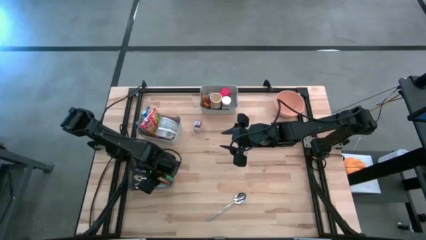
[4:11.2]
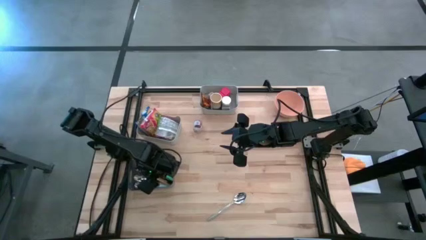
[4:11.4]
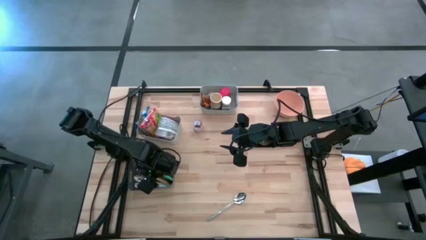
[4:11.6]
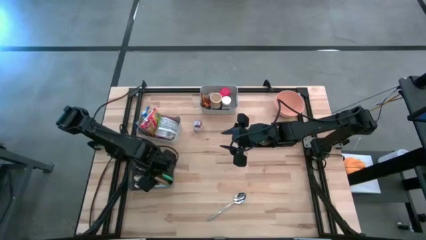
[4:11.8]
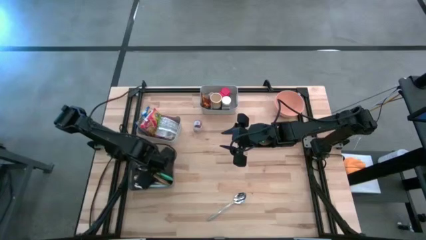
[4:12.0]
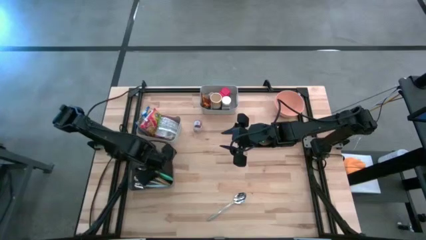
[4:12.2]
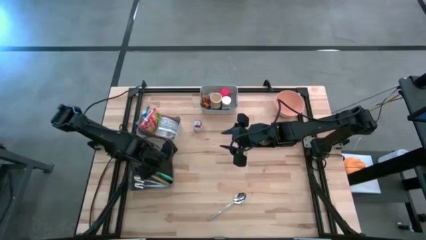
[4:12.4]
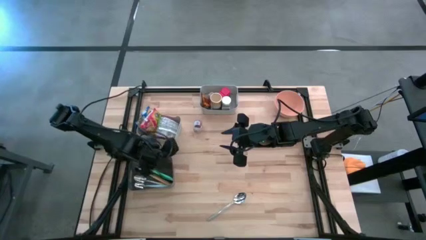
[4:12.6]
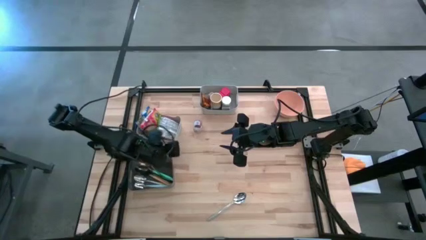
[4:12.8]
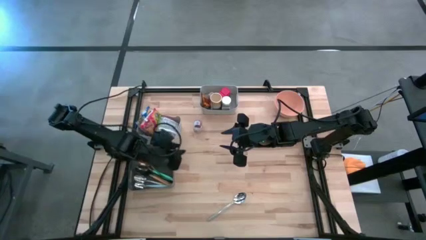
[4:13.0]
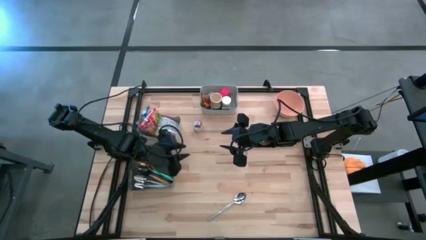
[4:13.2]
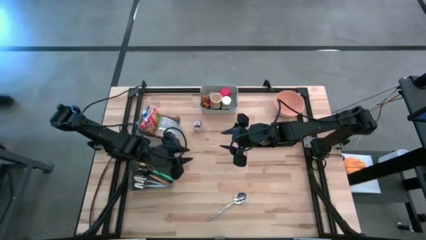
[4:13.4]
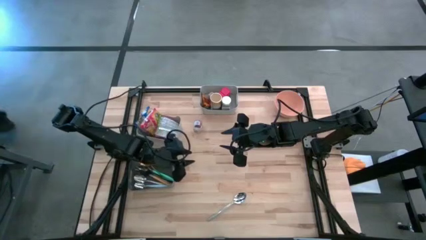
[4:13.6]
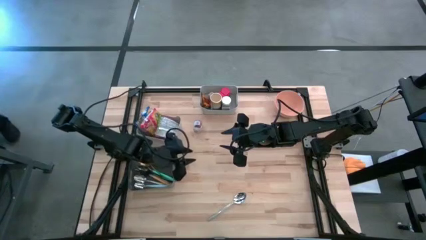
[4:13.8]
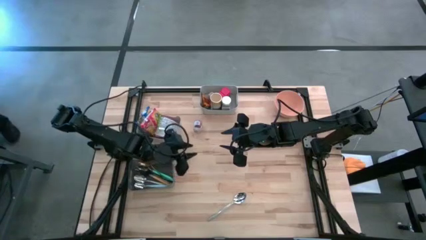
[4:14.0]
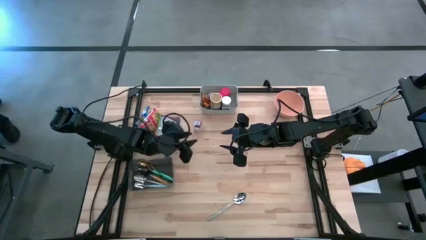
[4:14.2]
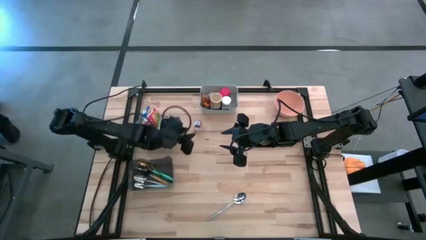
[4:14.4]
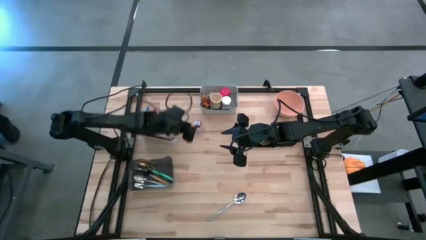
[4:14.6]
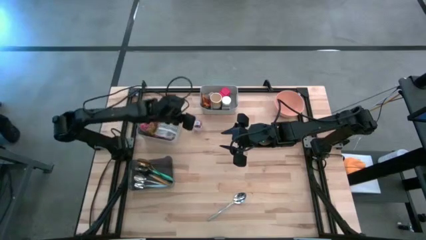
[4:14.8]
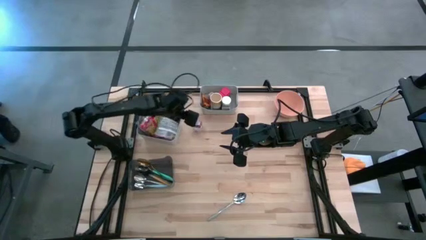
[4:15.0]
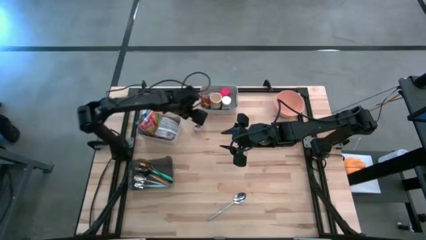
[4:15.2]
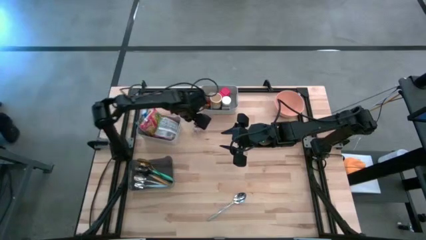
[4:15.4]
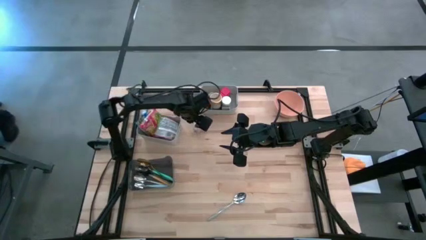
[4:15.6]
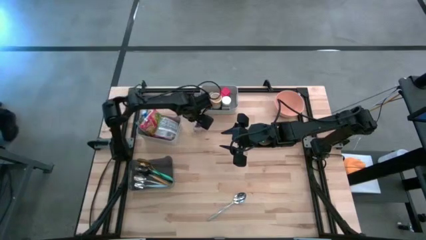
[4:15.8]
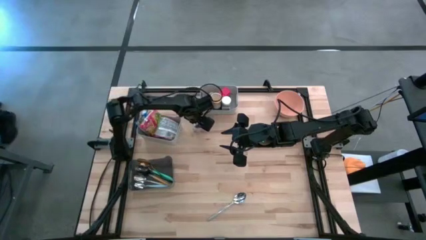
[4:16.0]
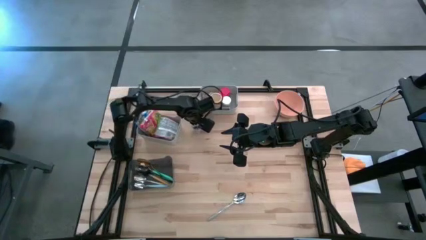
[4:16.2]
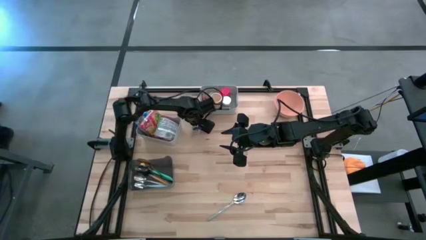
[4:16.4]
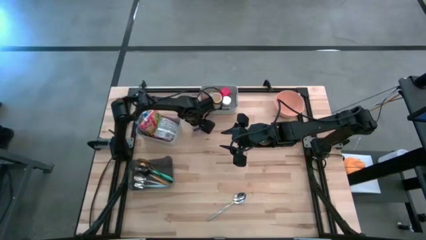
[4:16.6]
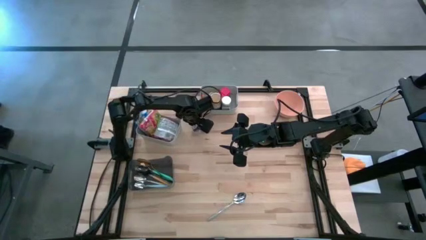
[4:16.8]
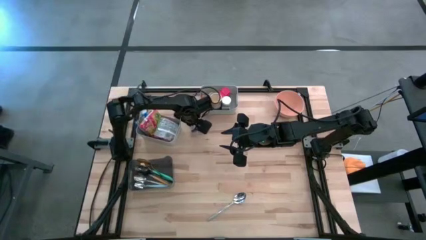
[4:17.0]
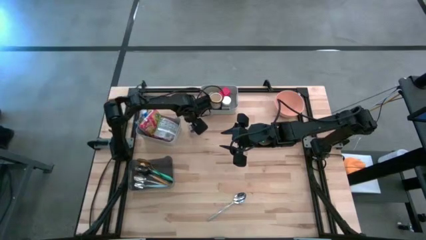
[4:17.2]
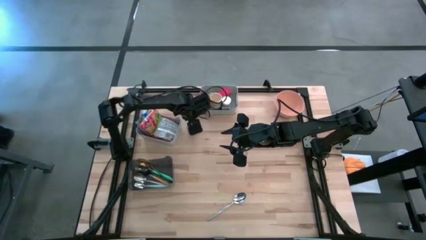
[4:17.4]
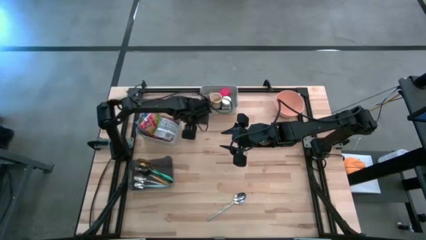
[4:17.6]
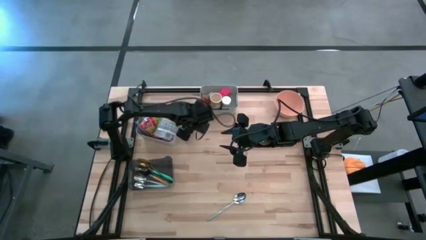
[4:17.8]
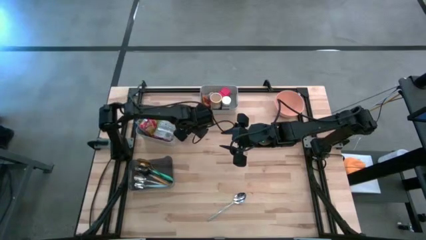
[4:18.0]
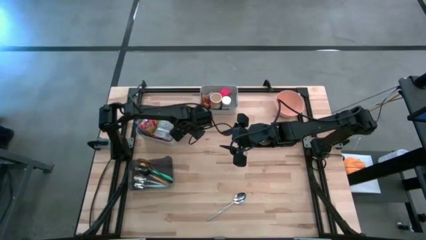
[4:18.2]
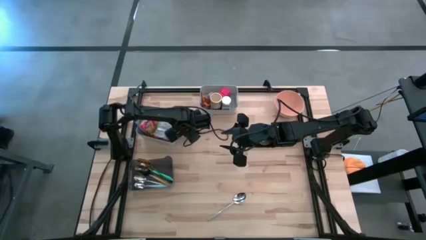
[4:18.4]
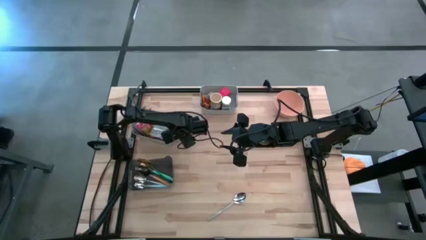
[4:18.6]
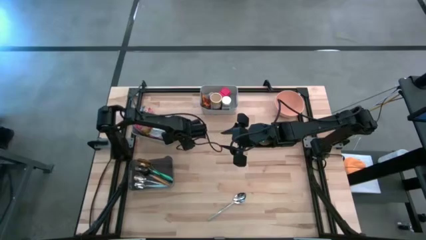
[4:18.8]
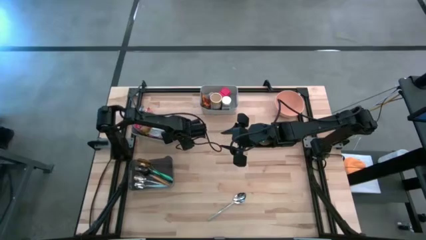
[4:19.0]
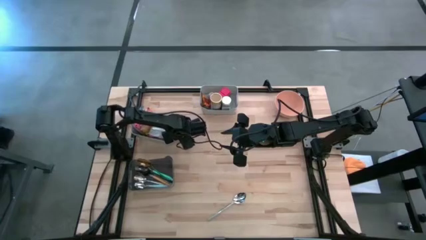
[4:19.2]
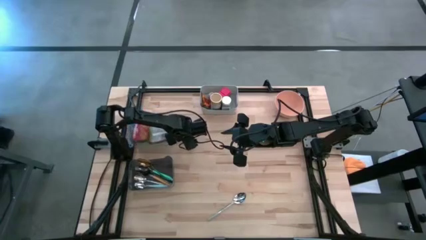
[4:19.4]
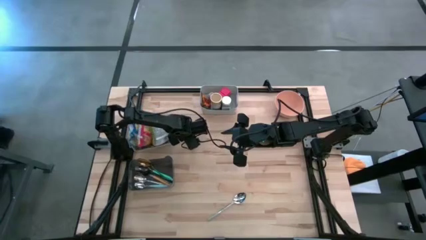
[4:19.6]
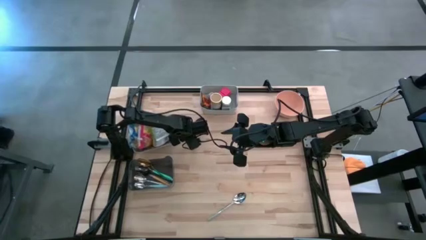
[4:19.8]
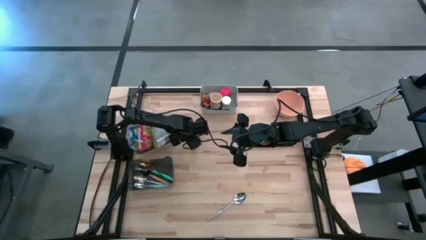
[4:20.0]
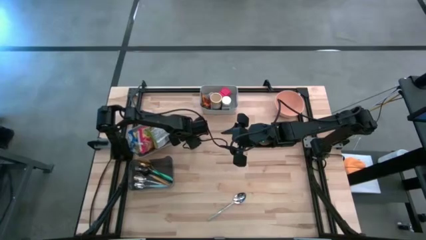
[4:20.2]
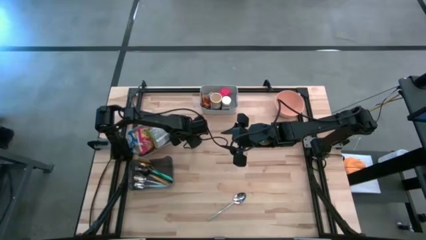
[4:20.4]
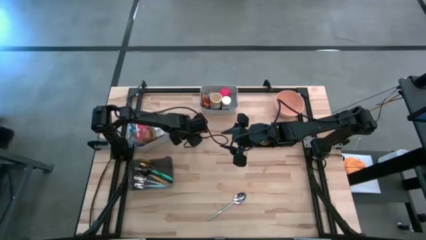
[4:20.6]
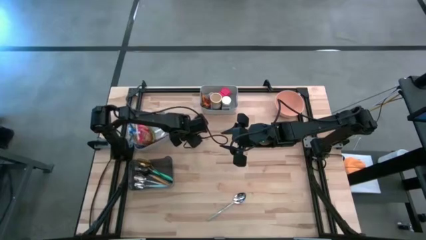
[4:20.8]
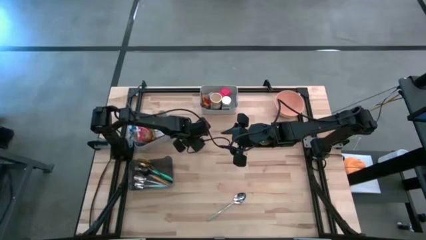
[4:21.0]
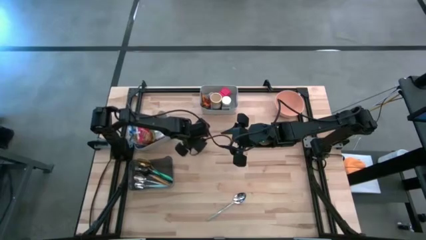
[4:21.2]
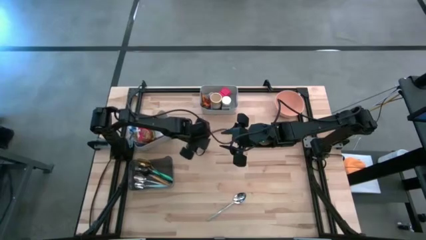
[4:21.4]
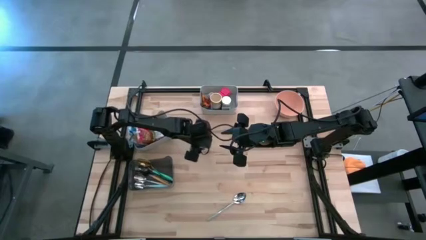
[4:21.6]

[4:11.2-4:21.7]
Put the brown spice bottle into the top gray bin
